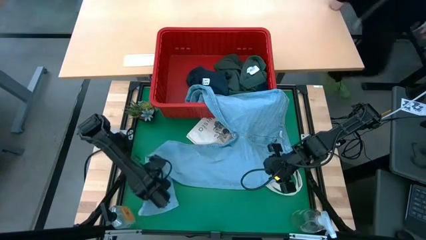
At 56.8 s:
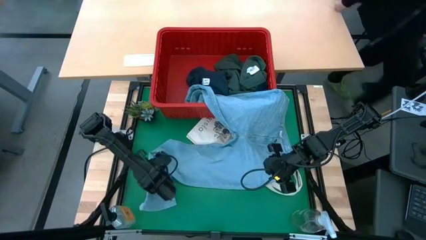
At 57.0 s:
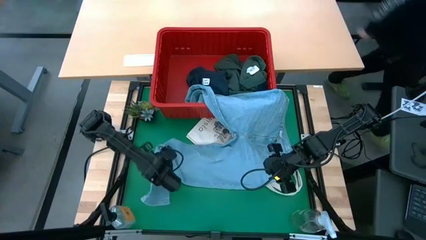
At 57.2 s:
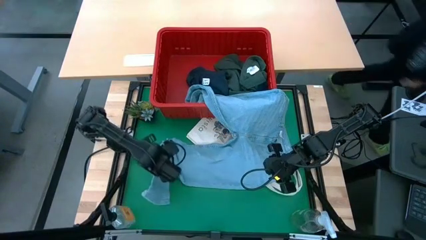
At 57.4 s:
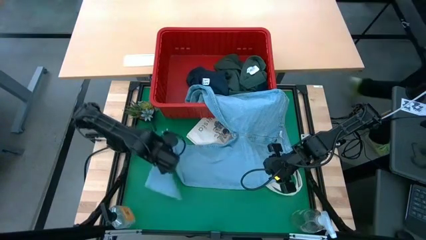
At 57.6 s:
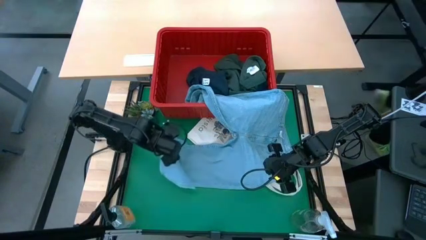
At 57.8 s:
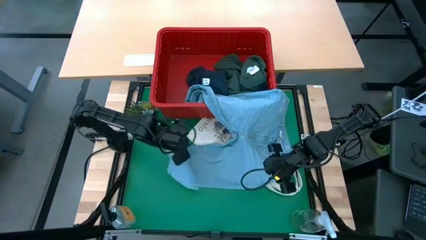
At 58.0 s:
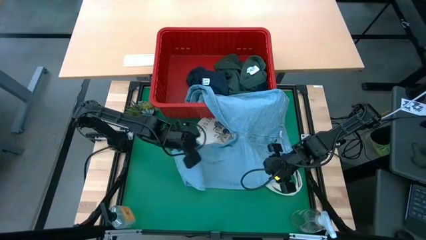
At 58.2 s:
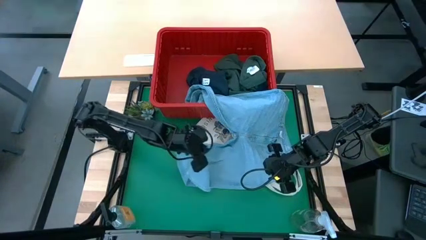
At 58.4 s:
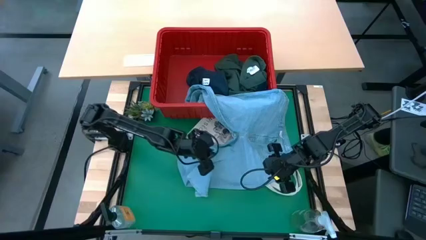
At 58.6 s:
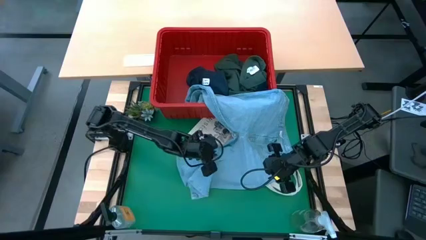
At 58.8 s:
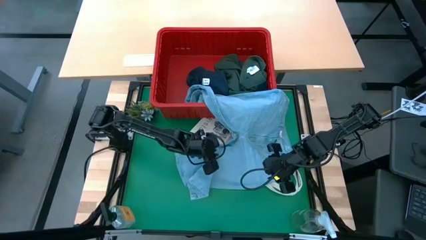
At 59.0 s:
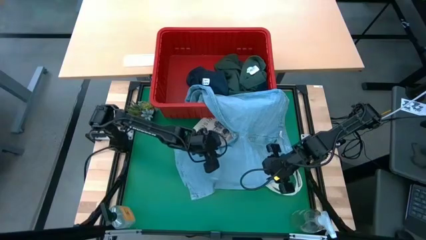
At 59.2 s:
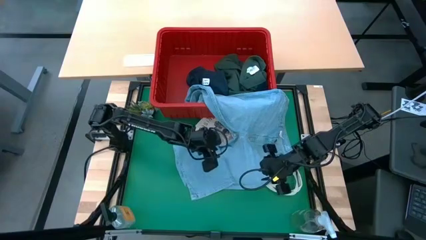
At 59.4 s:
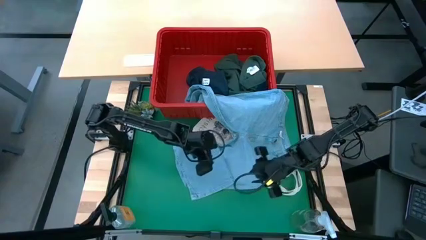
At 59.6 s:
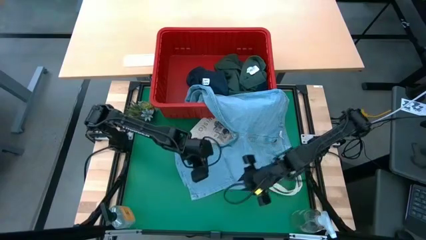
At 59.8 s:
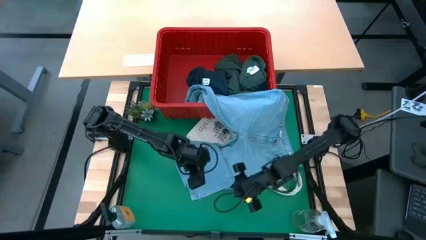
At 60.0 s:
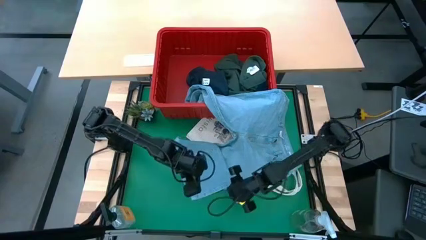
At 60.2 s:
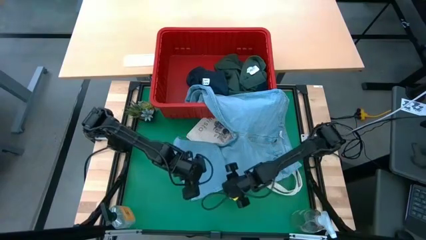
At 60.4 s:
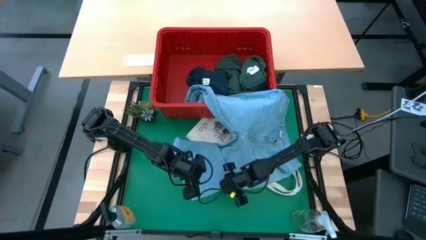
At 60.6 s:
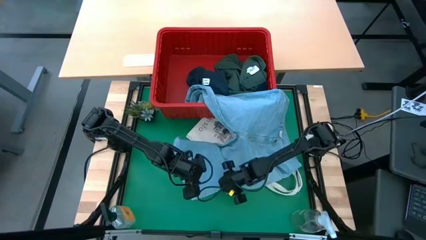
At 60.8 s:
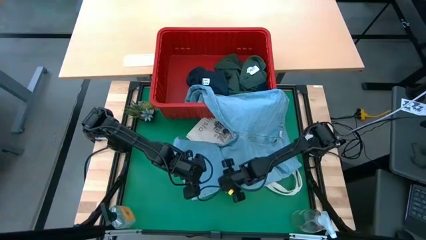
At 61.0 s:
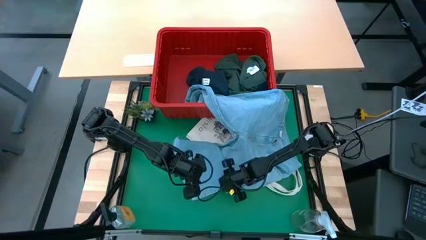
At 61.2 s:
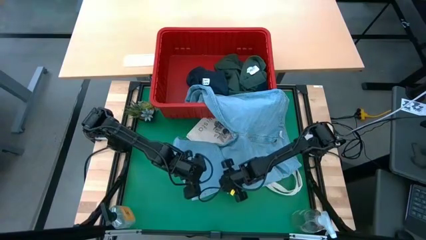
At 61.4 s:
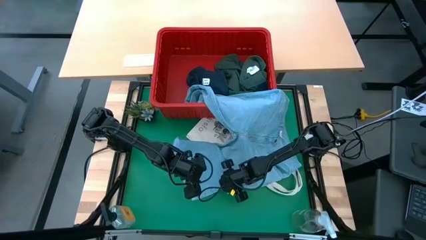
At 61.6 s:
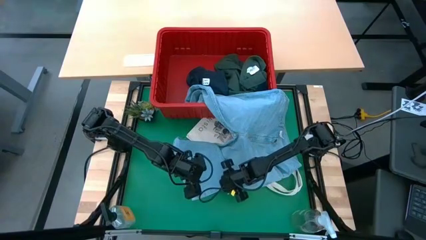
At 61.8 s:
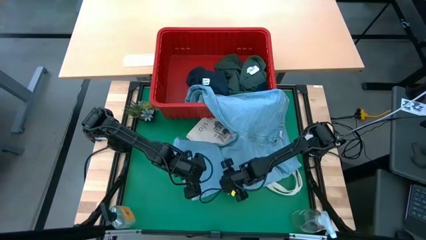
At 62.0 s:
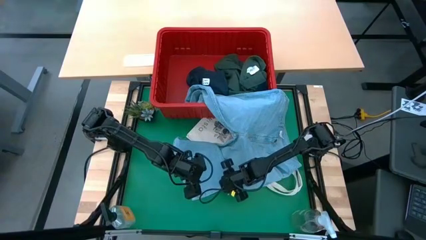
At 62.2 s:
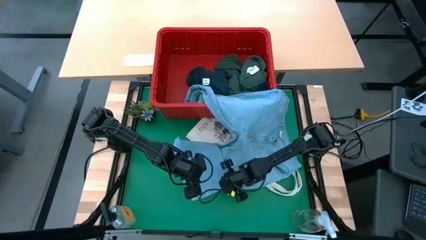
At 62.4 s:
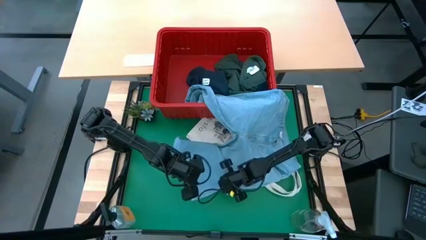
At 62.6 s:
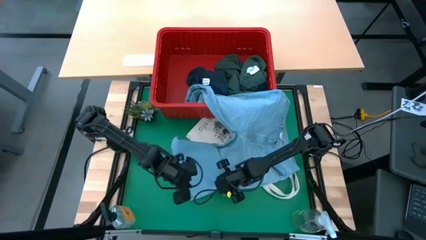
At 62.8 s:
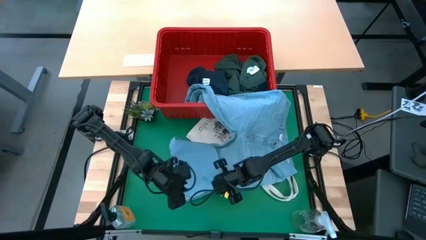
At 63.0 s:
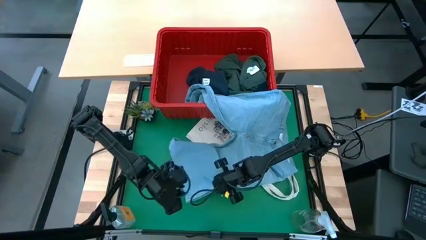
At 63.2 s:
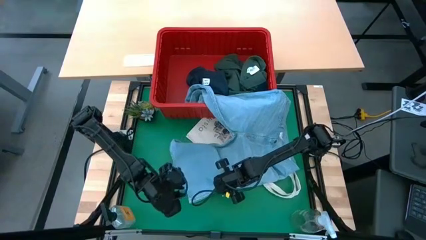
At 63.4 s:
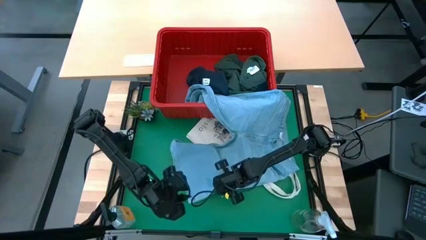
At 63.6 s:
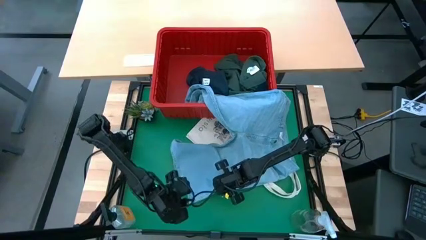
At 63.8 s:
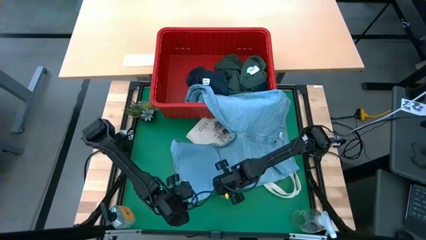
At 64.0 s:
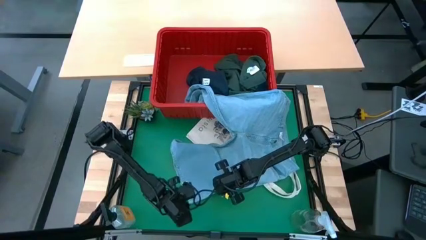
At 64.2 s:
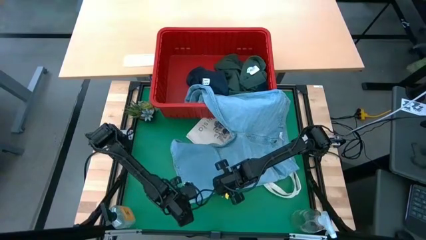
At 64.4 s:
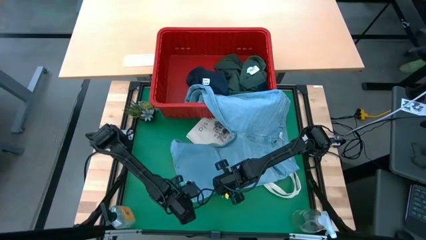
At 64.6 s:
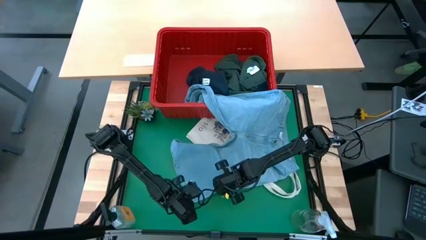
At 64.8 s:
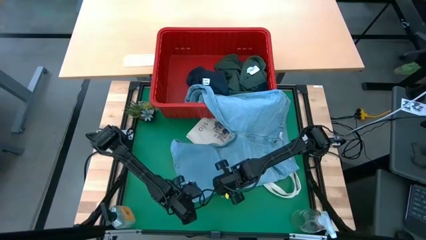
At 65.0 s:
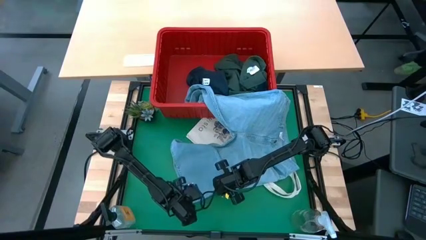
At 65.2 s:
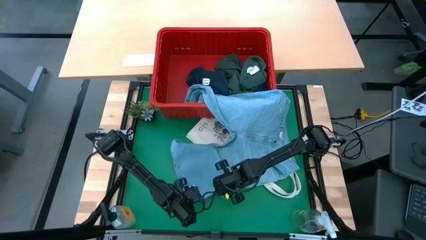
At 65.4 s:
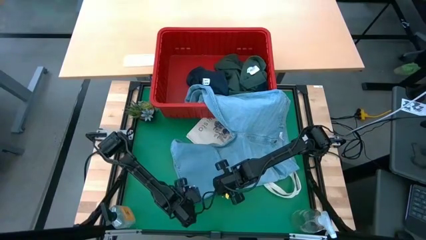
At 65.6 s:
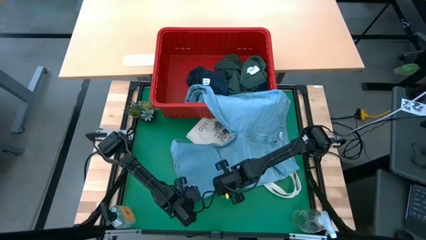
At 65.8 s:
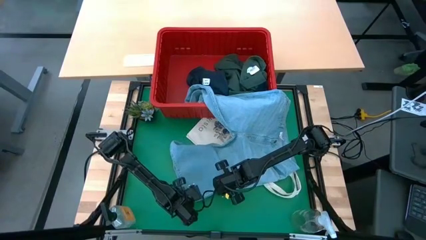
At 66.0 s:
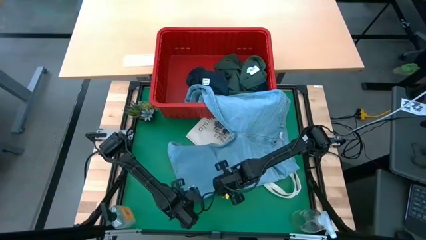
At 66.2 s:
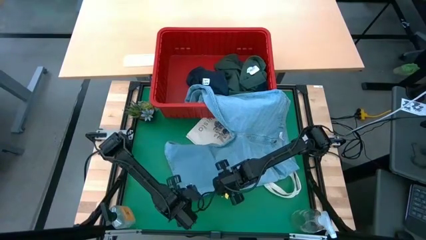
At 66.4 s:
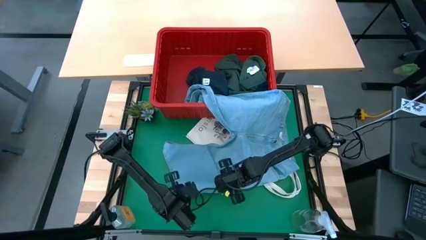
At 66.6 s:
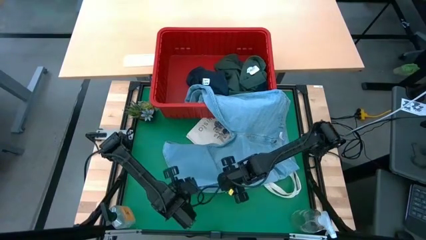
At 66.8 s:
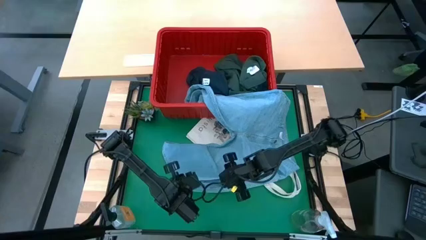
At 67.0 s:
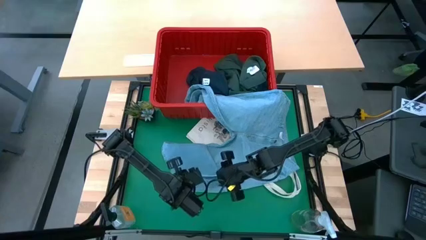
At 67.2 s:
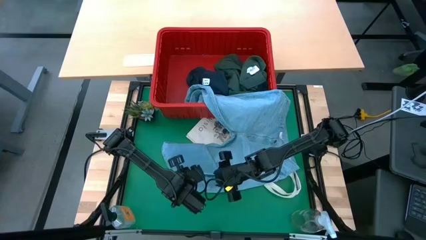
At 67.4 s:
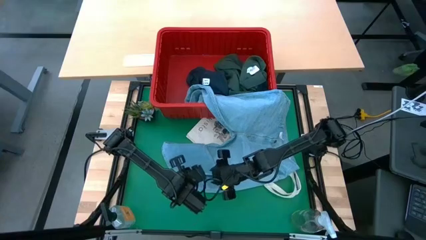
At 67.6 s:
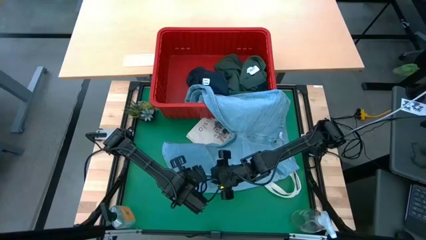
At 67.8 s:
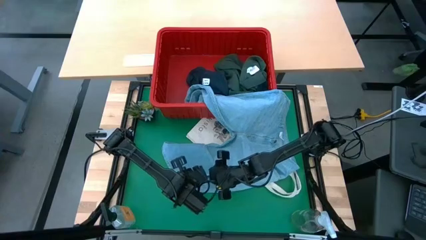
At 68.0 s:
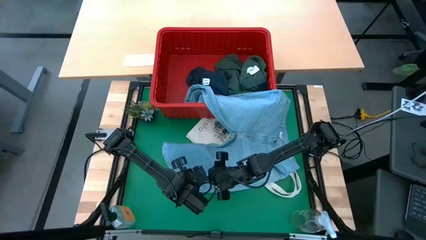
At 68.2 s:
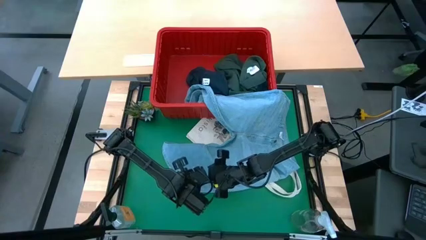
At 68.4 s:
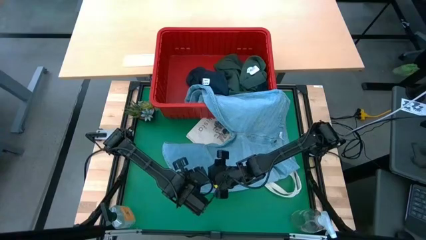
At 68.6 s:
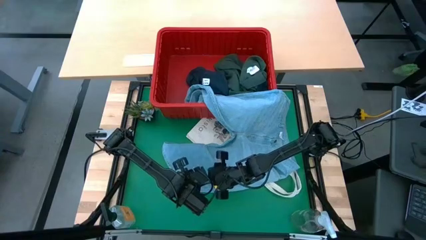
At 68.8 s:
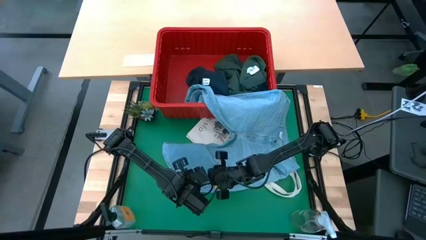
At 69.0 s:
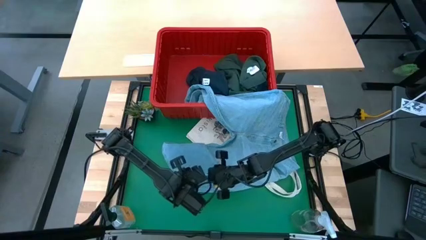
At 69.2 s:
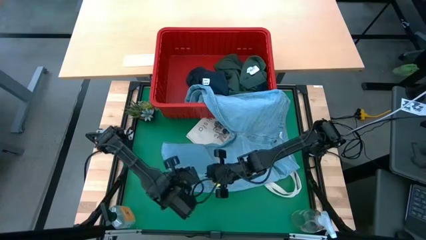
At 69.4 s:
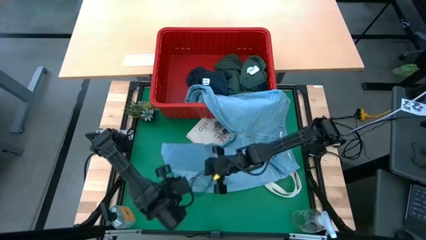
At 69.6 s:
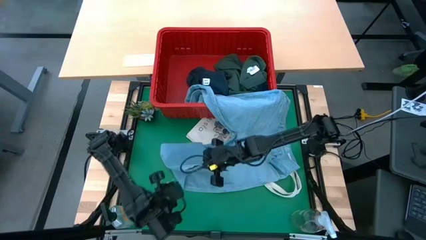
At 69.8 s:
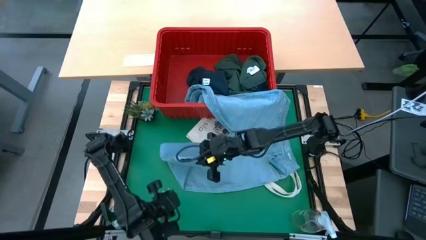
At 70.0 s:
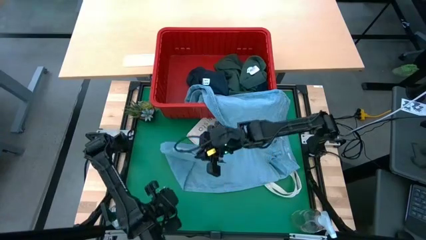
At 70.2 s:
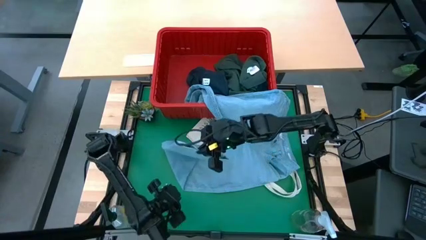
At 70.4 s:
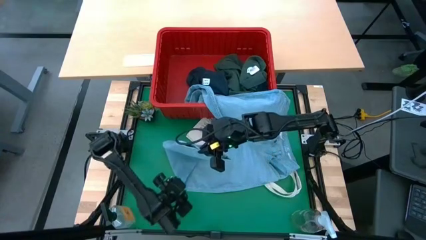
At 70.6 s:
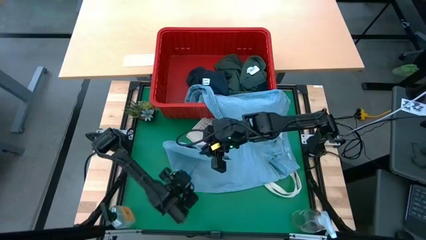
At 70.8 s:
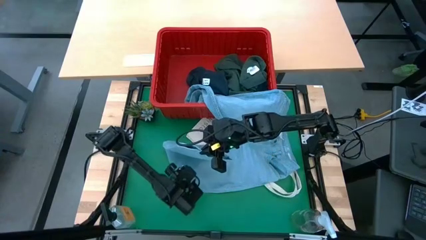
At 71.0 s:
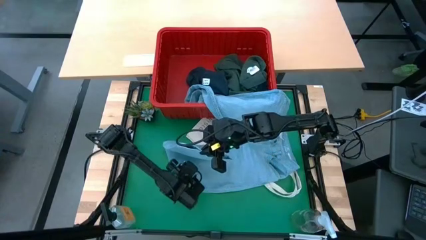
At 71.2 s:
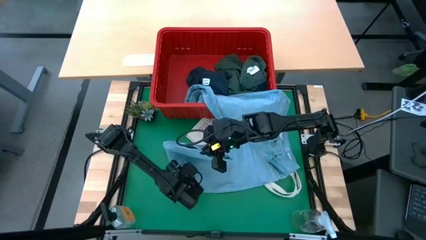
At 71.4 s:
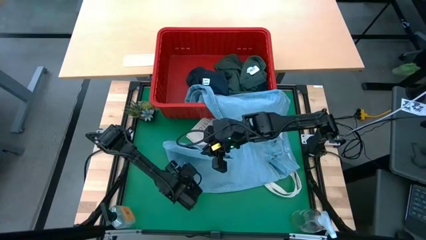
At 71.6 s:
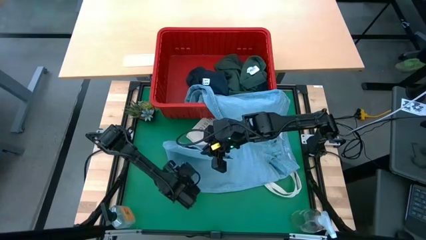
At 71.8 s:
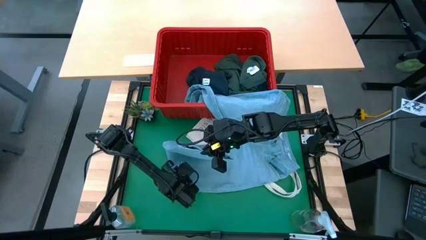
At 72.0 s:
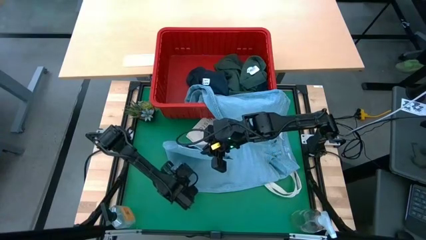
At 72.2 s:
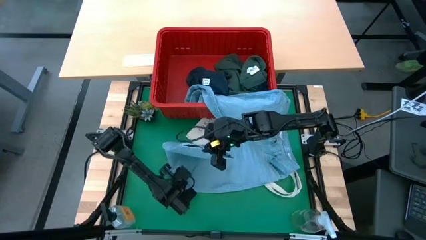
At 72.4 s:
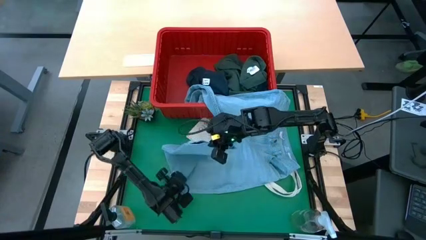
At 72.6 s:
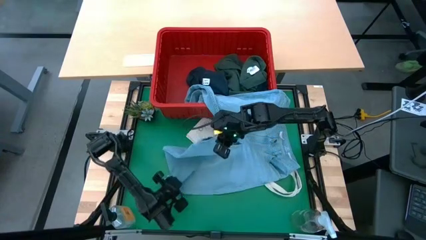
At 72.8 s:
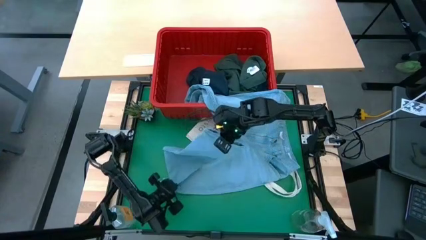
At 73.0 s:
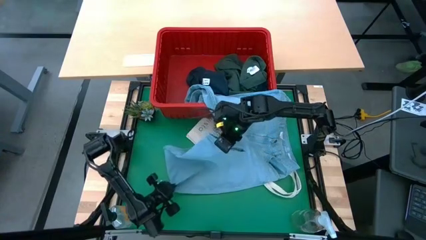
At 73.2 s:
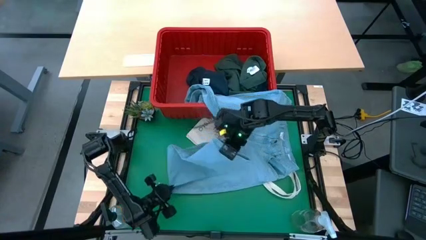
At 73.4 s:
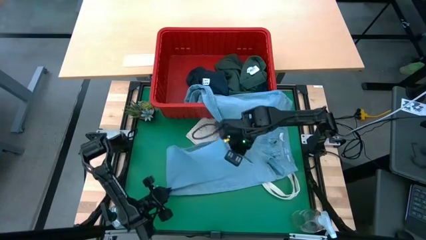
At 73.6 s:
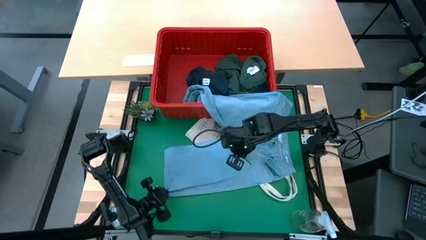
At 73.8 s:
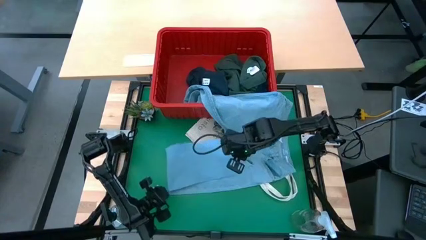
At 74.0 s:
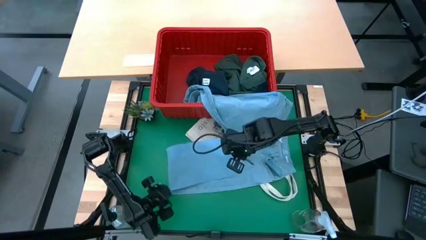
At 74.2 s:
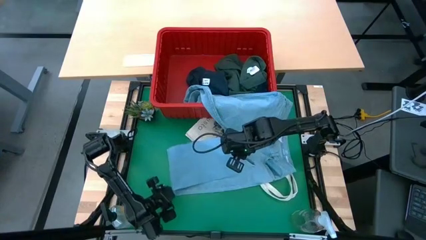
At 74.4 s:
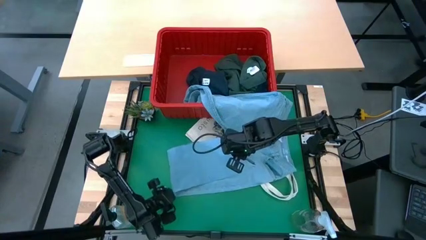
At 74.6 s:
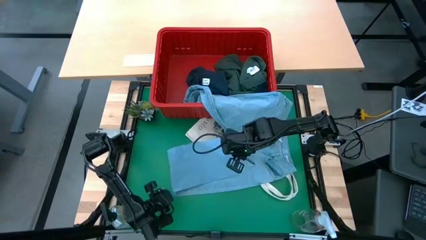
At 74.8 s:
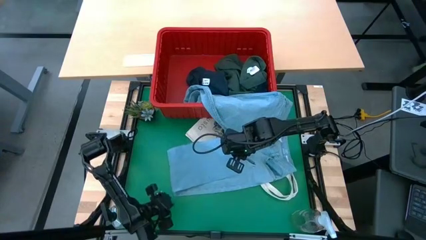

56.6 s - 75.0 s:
Task: Fold laundry
Fold the light blue pants
